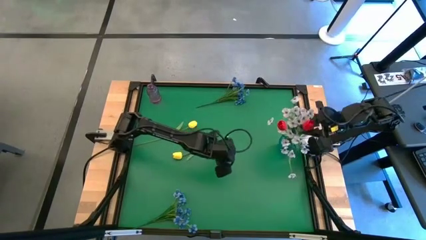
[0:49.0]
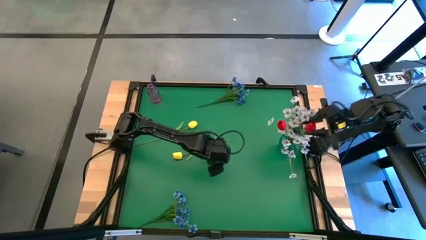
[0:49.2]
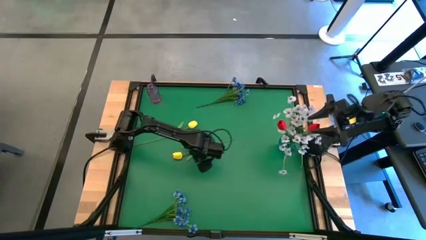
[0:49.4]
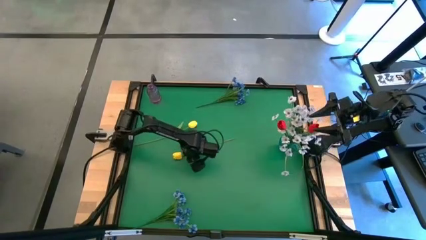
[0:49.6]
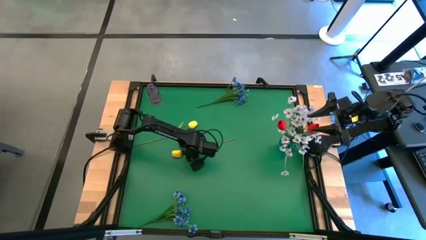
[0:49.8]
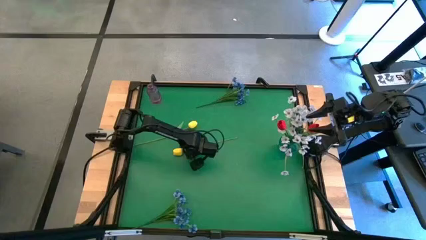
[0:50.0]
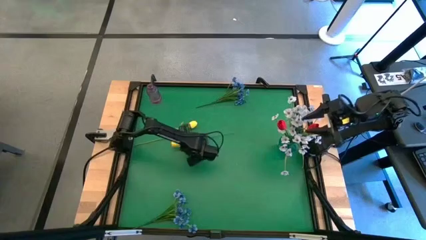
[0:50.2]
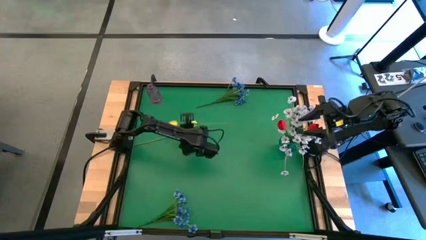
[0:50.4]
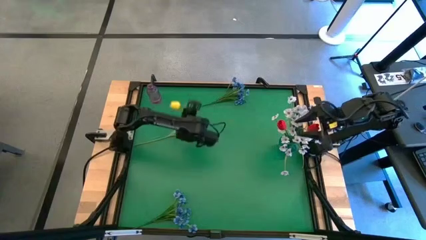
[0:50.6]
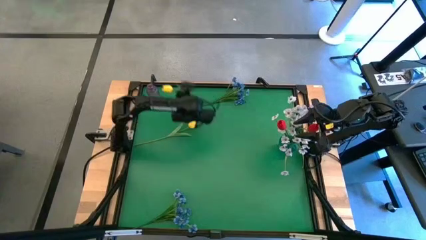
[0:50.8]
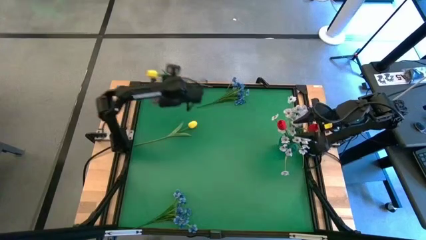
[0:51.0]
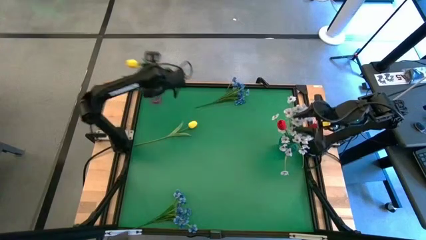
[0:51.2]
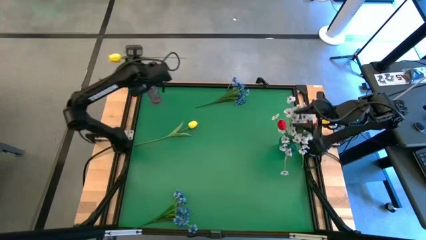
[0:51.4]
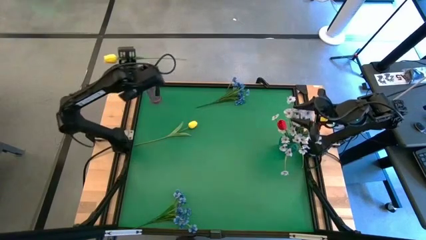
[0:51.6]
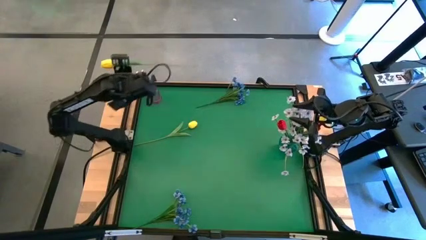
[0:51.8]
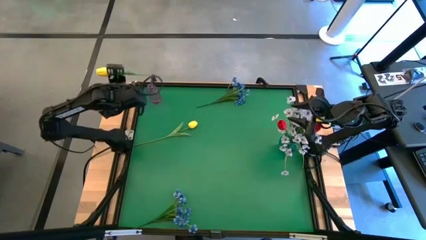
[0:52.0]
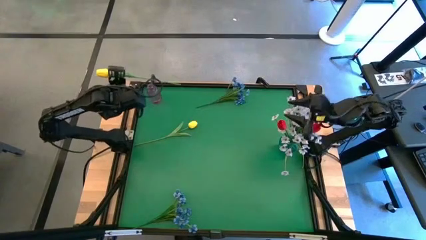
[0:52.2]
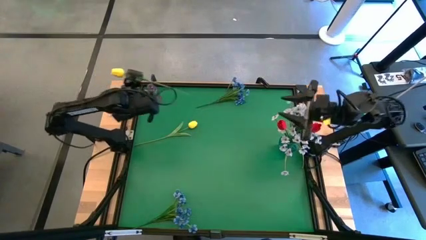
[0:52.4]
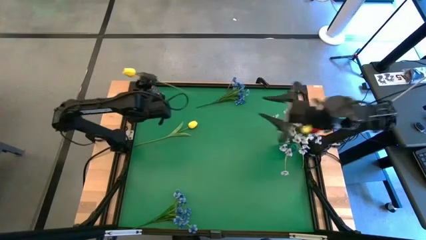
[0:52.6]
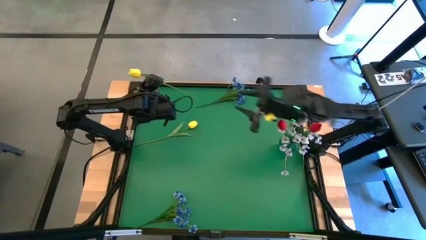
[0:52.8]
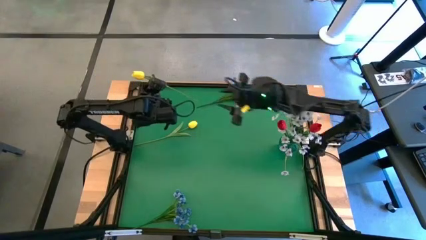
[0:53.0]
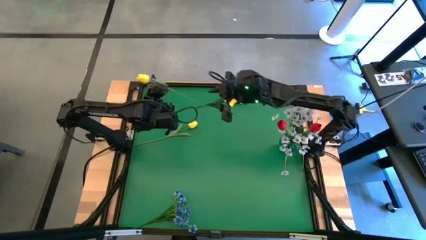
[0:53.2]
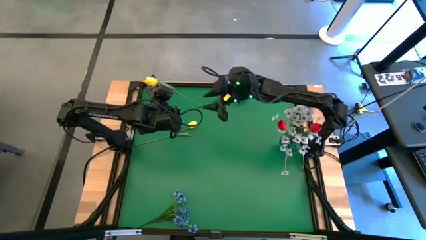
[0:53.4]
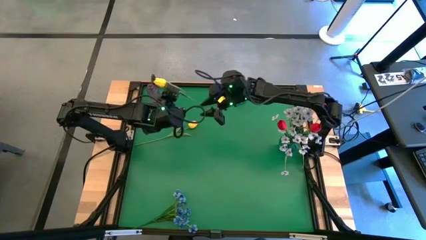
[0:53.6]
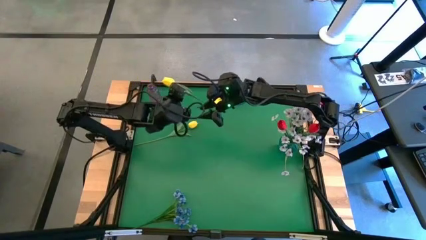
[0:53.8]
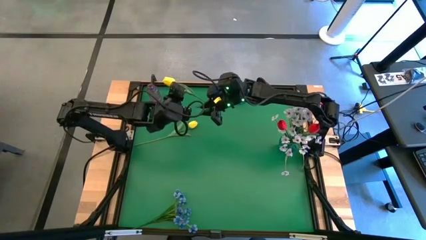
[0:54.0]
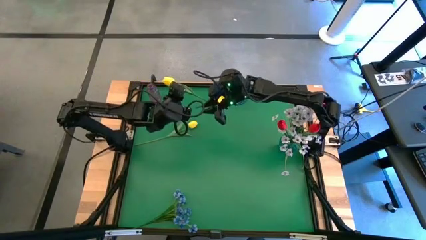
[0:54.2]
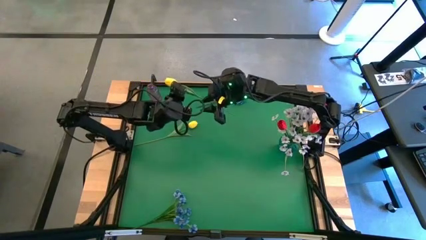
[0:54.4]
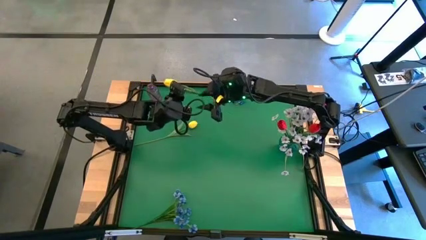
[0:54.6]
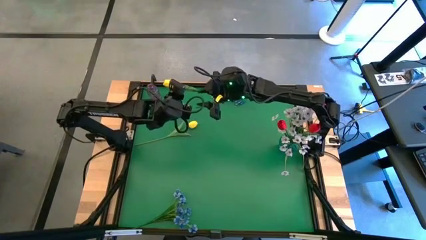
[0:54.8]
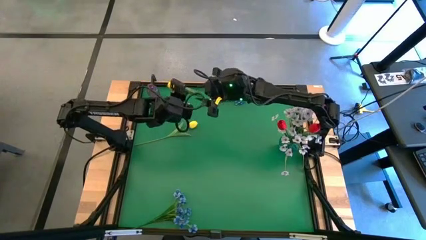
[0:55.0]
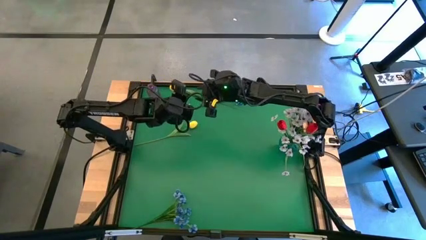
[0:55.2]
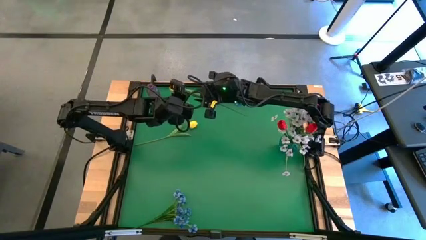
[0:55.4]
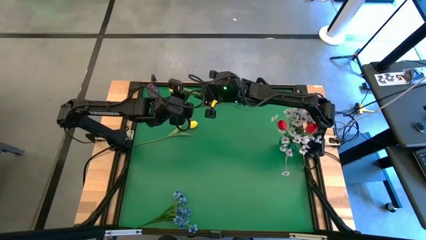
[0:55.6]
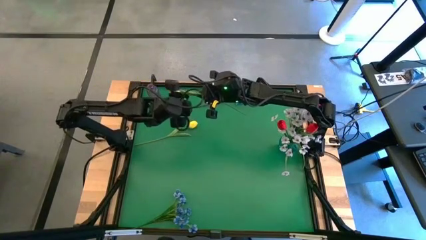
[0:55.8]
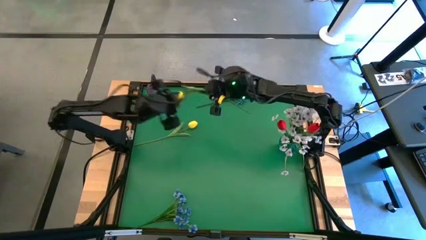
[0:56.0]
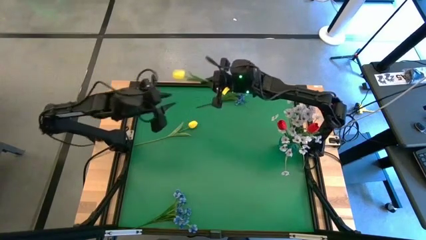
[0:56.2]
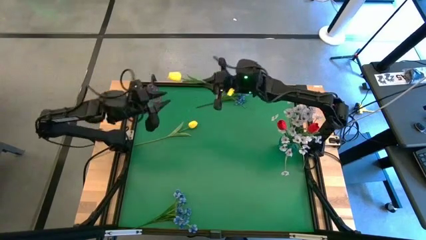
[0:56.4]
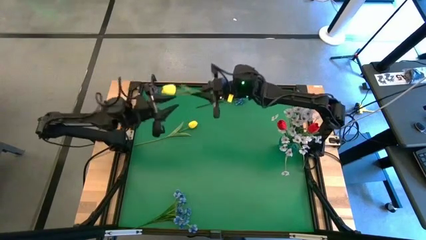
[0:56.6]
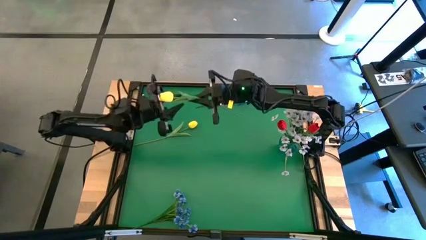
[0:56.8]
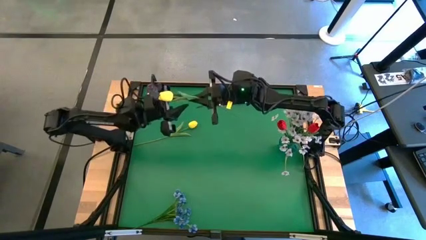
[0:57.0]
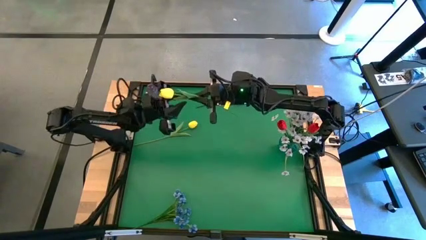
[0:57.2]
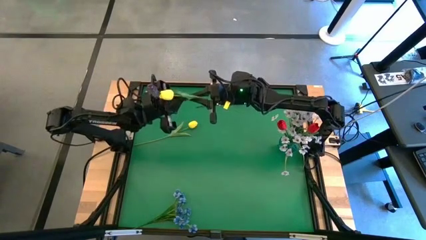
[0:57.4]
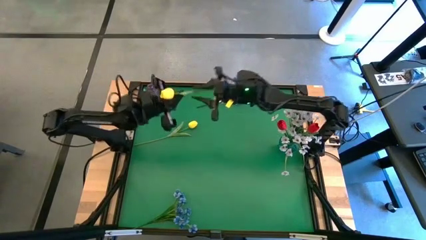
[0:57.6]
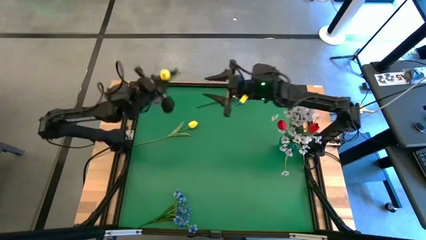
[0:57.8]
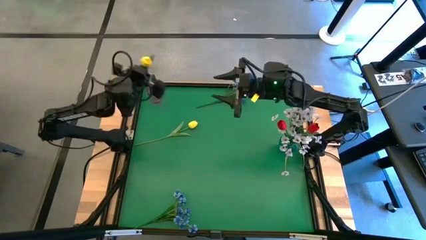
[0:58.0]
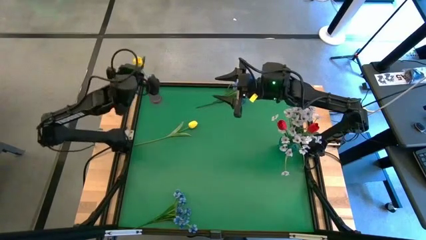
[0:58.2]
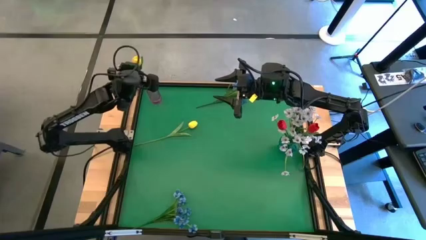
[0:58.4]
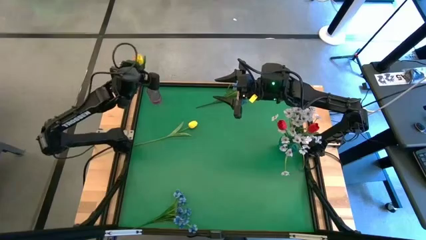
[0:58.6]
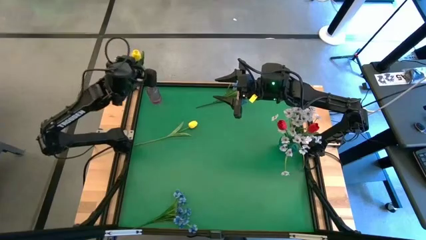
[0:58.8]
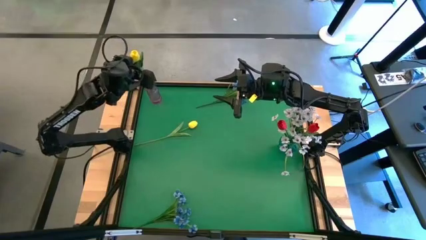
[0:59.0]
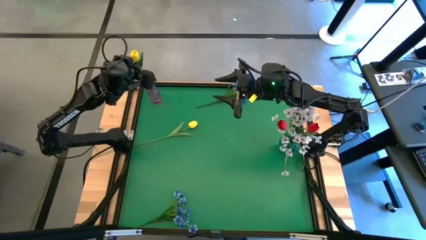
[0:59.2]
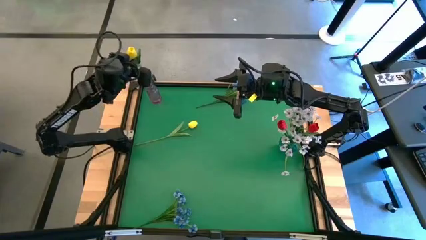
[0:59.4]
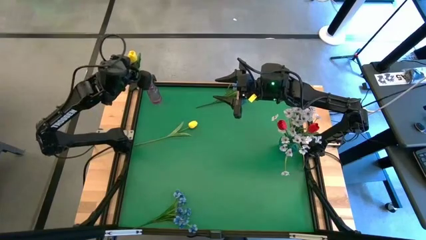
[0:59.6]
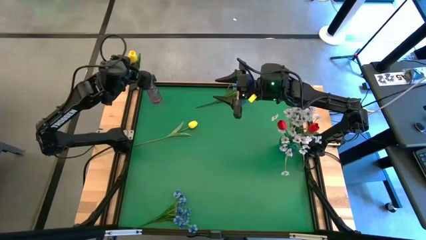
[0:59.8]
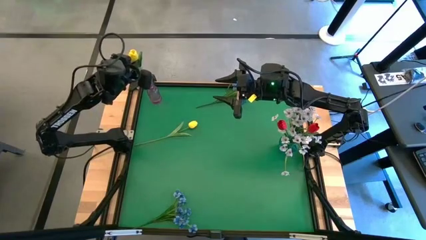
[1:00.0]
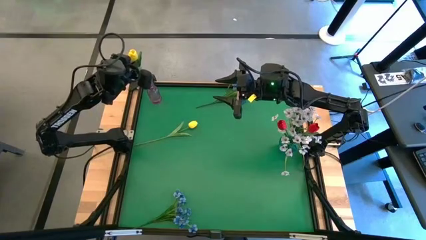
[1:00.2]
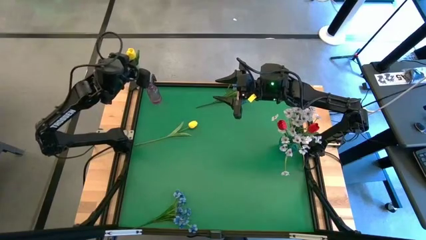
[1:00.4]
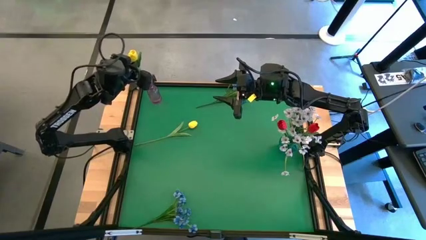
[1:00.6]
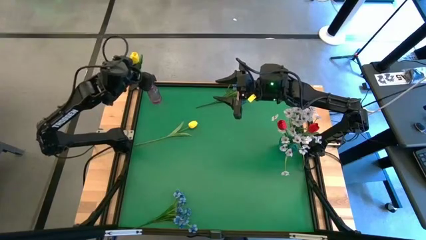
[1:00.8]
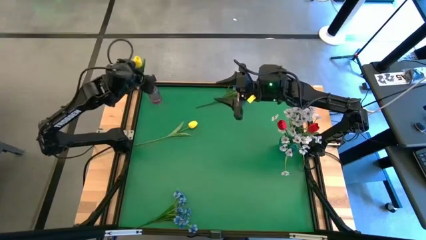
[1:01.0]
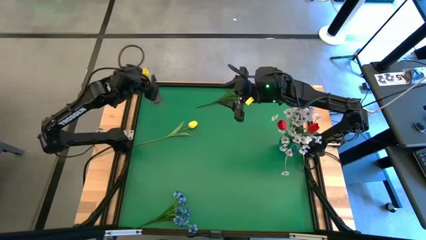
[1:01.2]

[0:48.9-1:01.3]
Task: Sort flowers into vase by color
Put the red flower into the blue vase

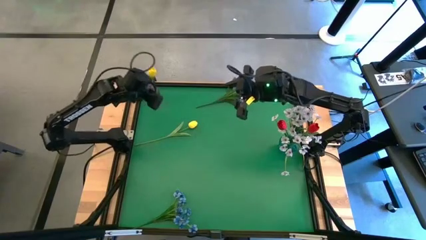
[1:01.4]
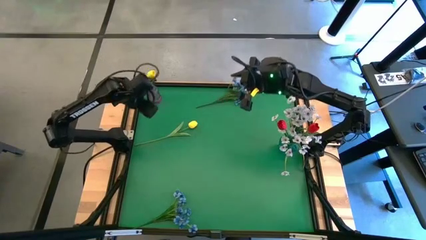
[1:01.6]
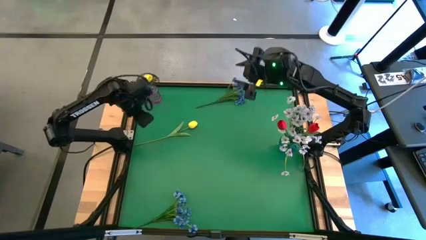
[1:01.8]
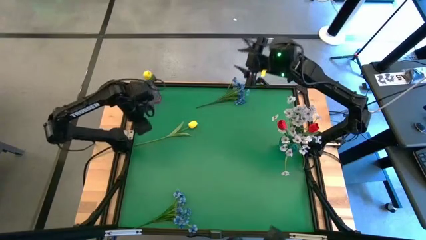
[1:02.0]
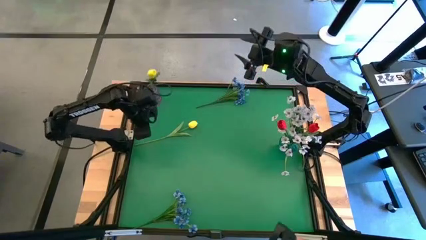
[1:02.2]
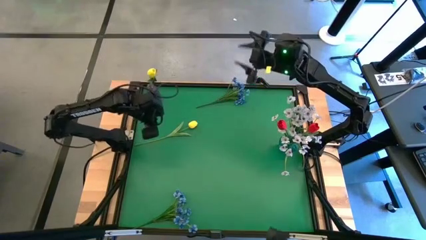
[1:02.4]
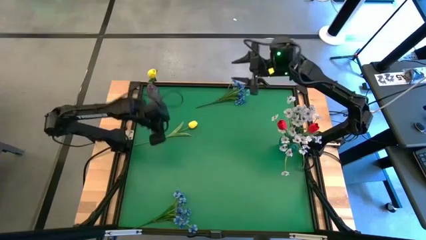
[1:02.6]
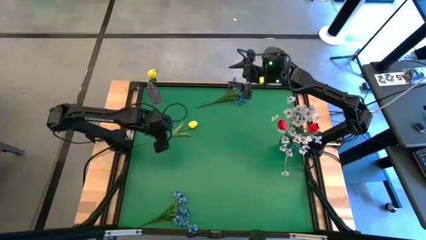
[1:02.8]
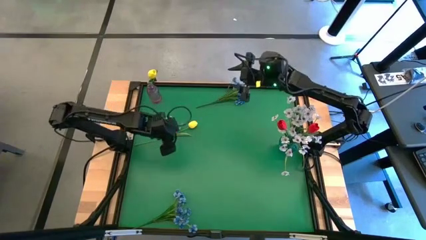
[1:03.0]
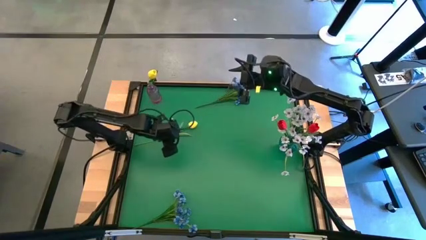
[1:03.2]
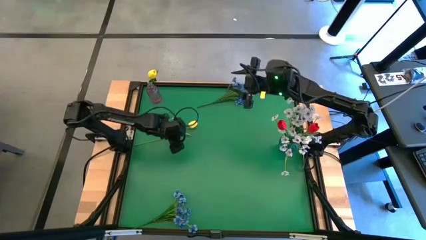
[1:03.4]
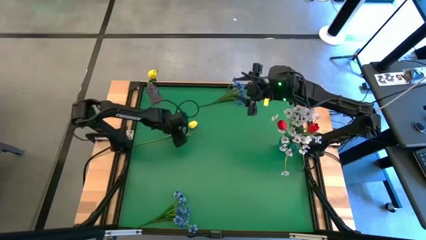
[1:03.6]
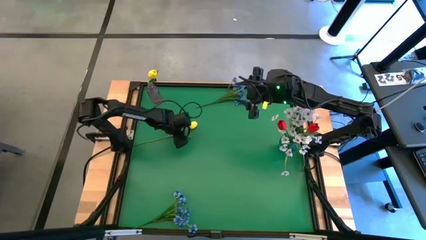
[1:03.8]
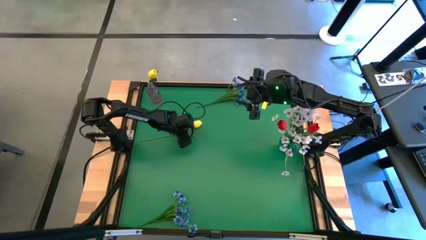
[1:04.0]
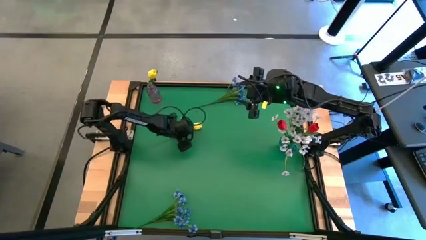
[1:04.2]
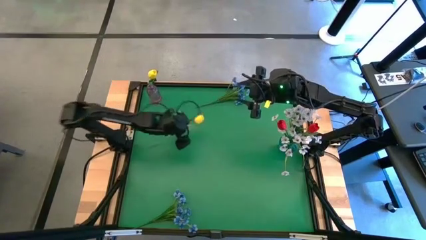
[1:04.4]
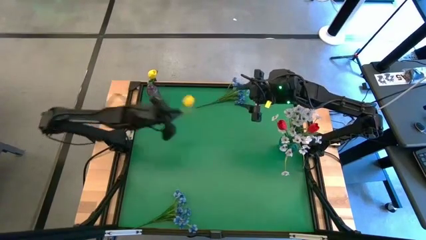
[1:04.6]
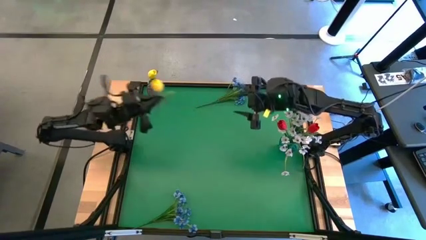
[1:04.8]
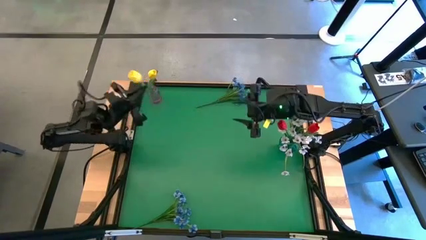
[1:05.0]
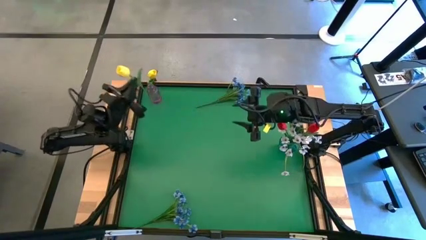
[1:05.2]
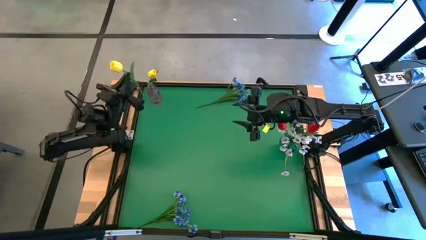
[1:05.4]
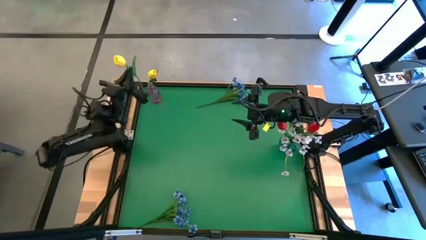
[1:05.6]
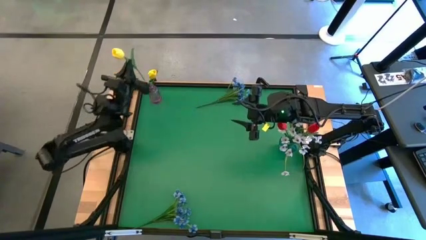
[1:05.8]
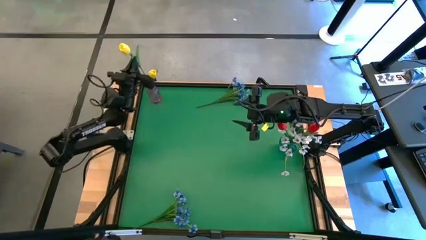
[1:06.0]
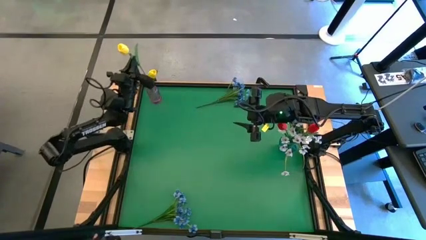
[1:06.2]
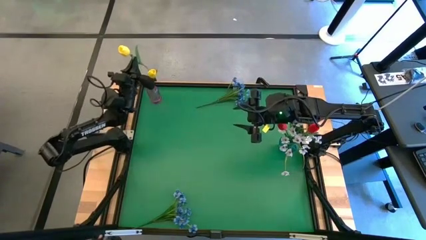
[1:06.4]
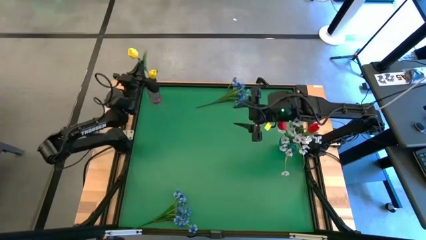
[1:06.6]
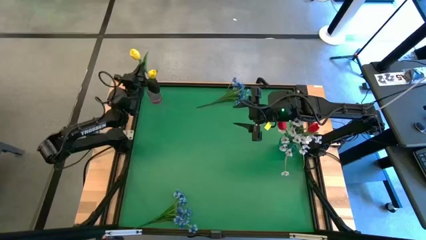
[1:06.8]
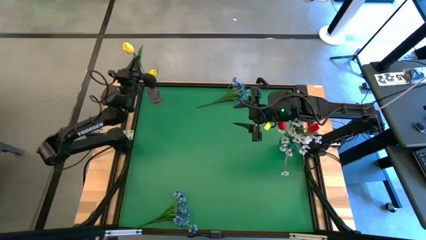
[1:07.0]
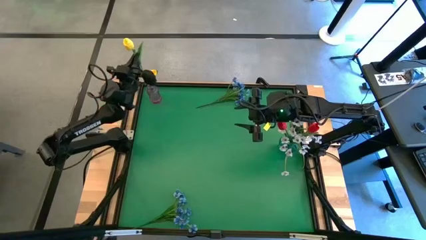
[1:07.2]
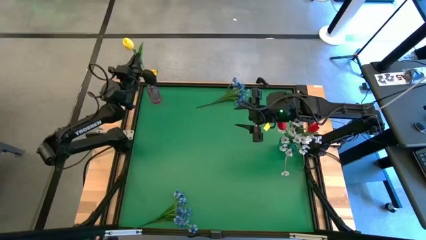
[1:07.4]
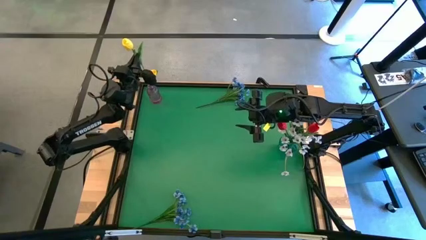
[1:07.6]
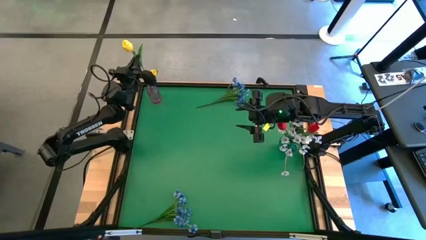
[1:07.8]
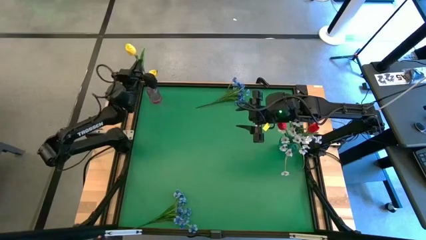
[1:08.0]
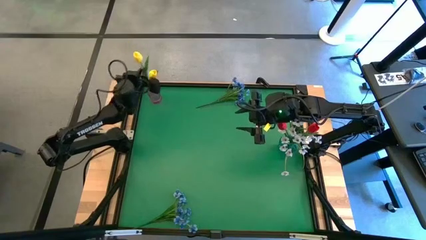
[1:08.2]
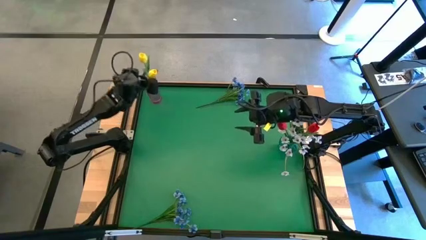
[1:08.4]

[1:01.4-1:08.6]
Put the yellow flower into the violet vase
